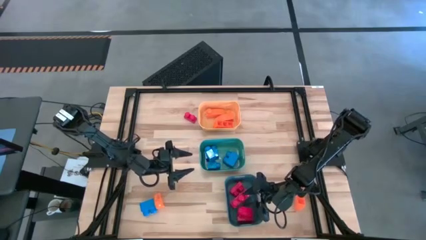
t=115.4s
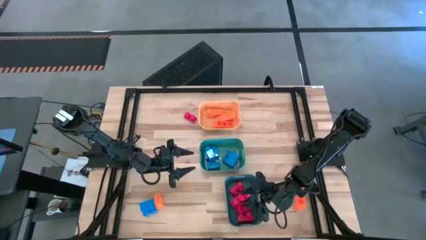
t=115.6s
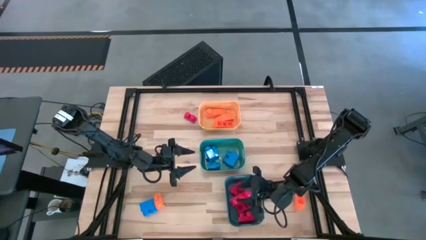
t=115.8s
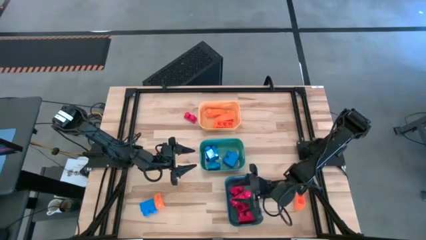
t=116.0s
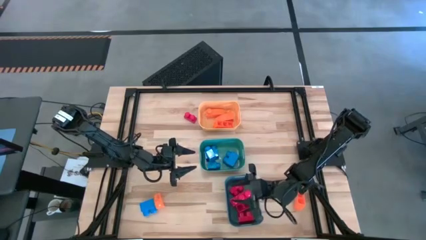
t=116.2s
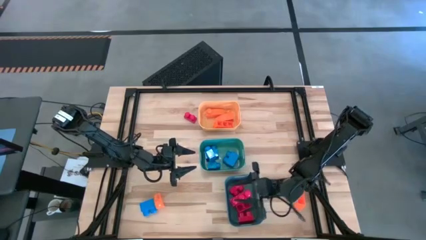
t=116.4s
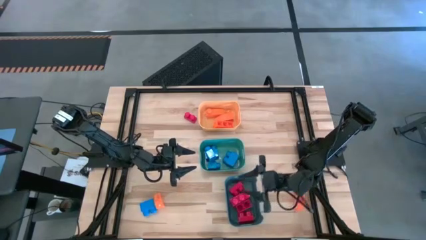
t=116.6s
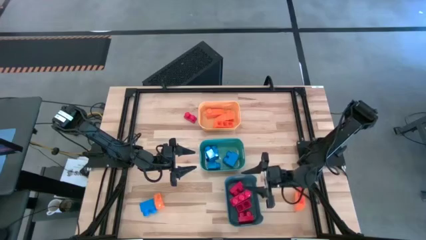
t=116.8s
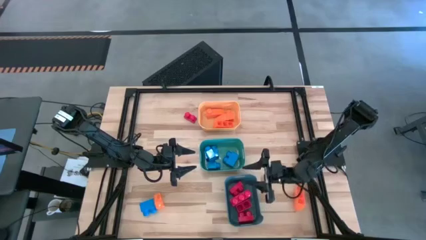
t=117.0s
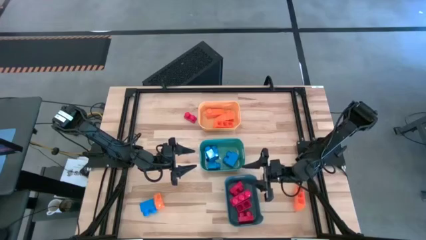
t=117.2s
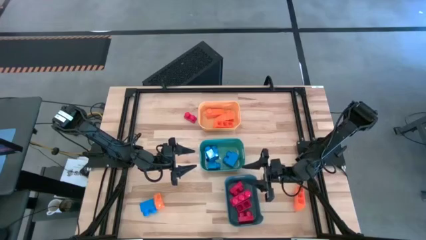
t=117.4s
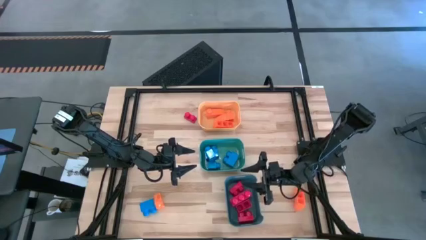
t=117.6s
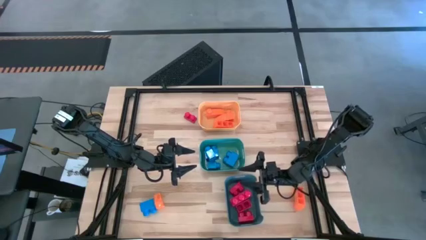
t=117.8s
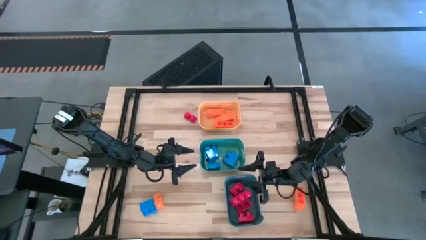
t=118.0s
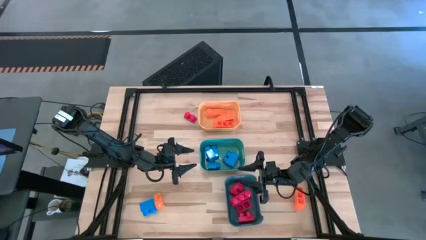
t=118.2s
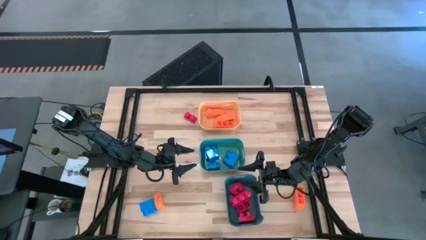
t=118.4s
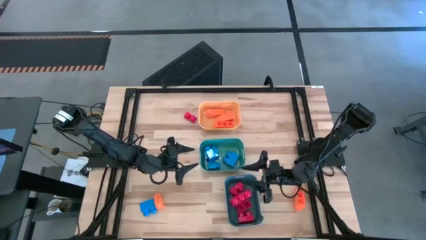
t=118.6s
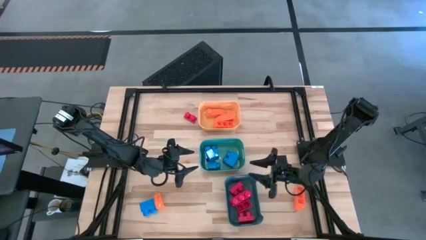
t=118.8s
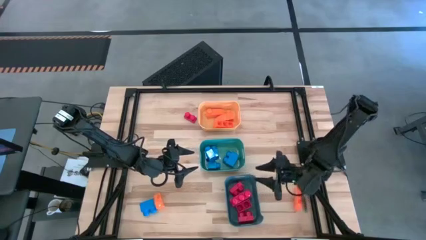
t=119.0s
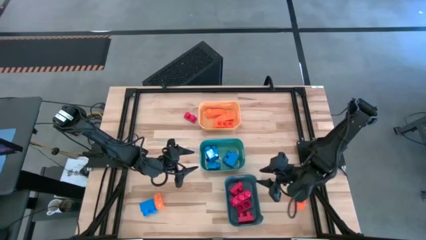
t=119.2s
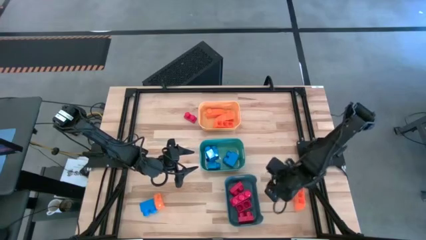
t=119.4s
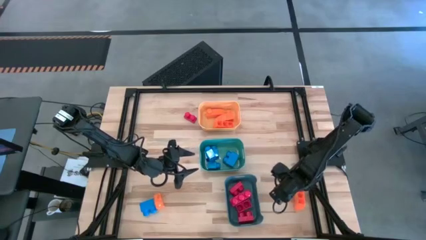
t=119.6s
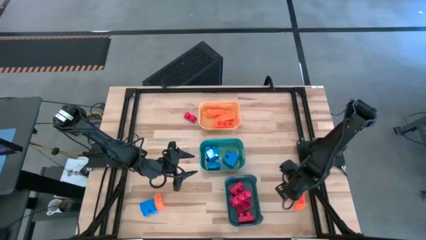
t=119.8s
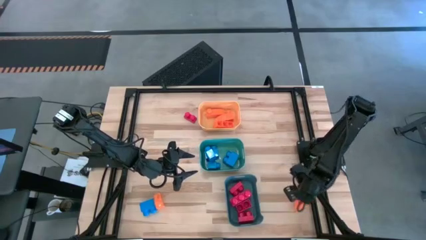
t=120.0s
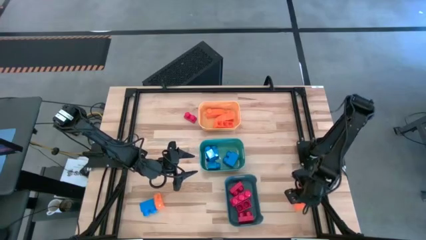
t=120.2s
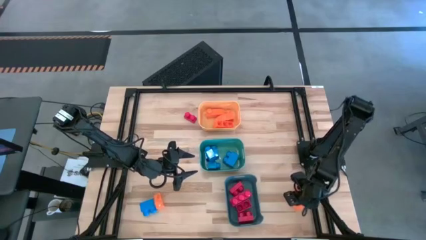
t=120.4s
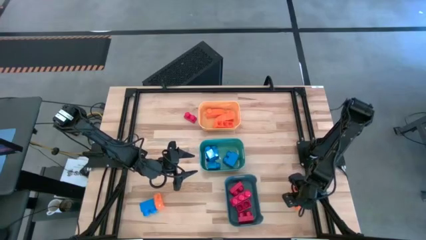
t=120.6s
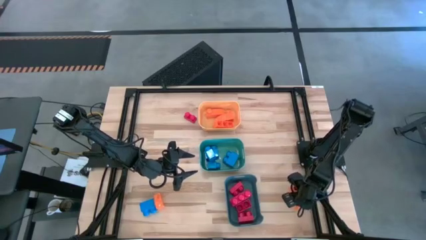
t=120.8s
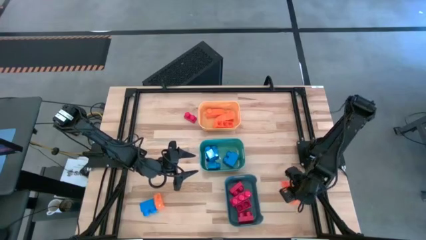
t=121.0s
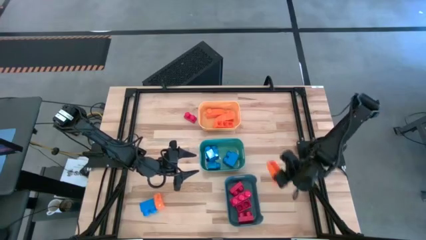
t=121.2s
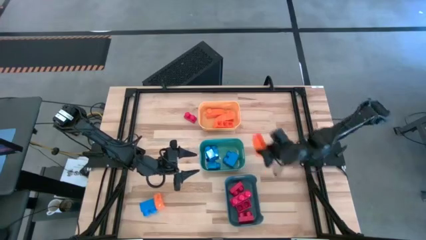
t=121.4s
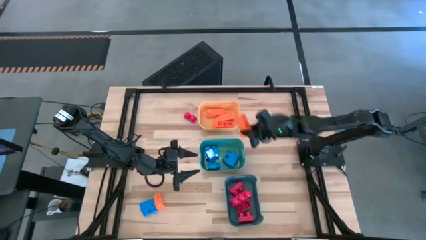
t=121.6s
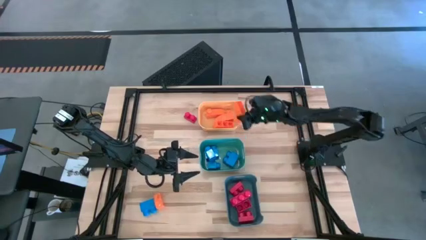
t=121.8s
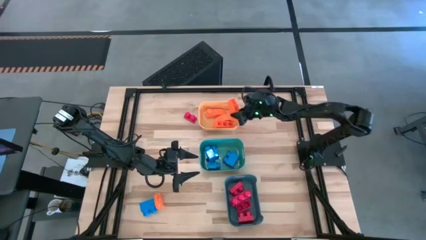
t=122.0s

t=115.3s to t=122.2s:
Task: Sort & place blocks by color
Put the orange game piece into the orange bin

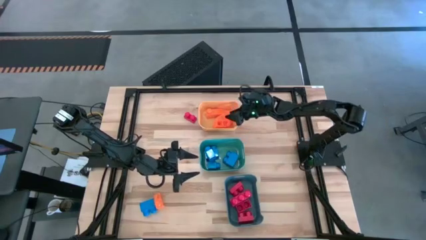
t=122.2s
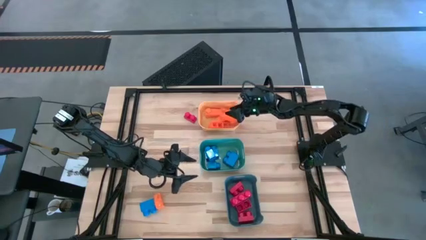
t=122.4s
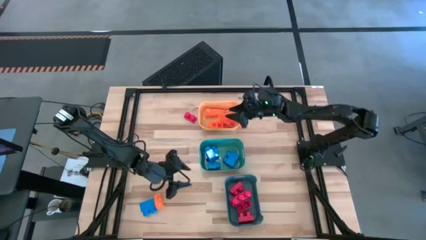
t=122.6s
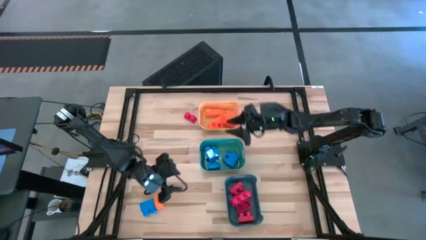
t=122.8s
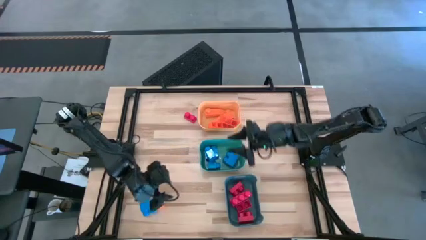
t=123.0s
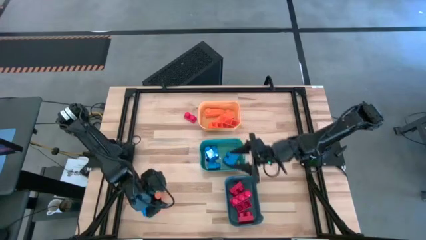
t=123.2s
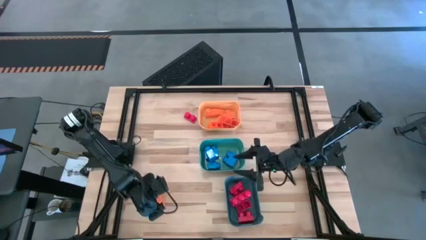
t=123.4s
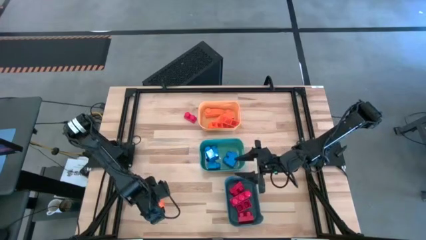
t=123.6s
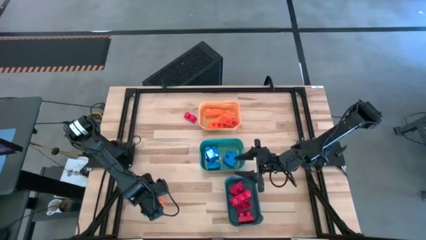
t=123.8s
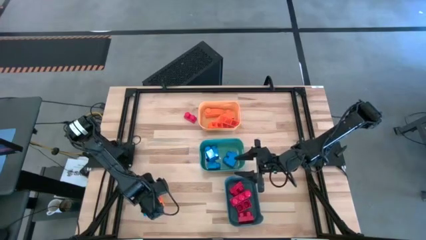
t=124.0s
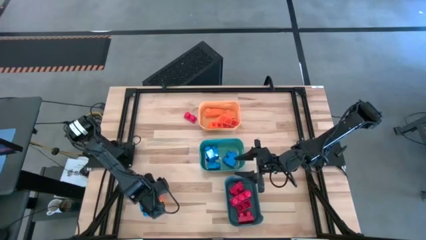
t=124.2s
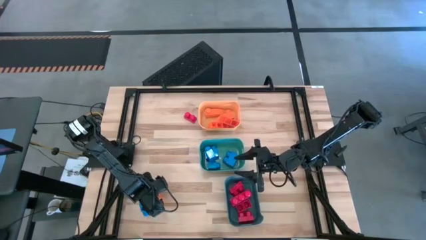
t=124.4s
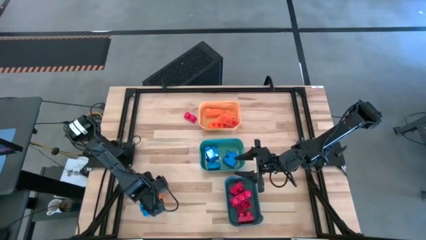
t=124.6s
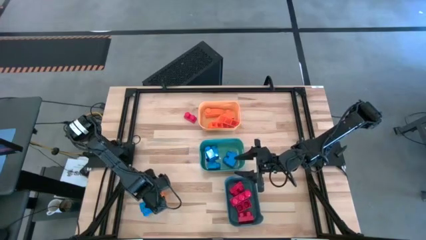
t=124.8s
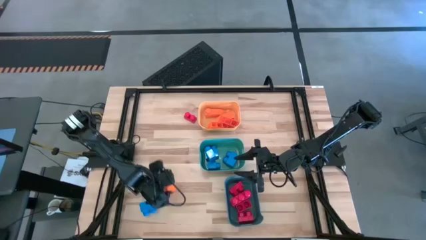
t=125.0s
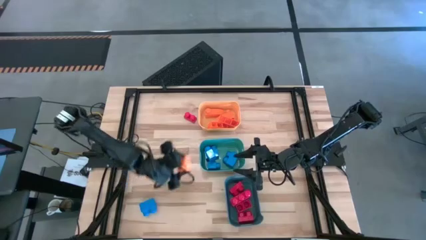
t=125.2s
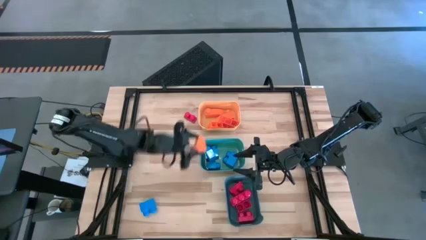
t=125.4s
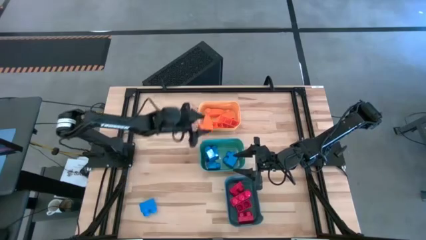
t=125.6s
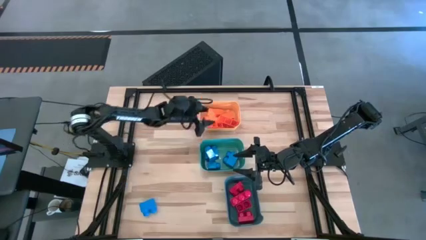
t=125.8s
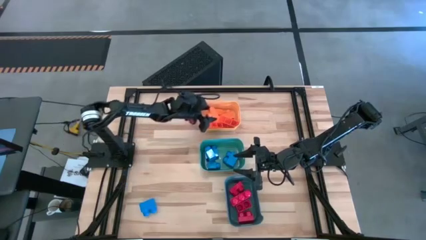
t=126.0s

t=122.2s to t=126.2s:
Put the orange game piece into the orange bin

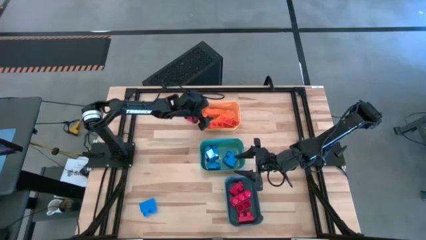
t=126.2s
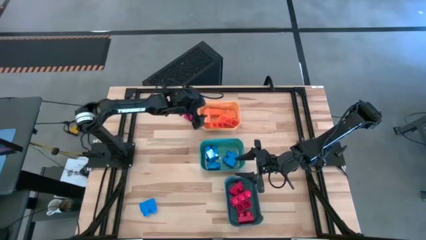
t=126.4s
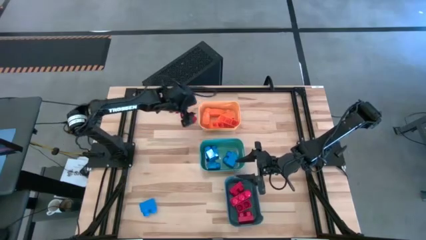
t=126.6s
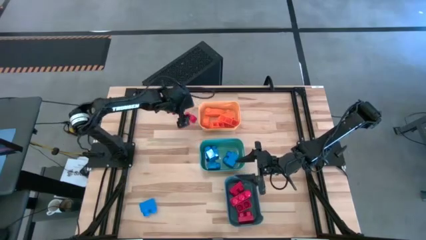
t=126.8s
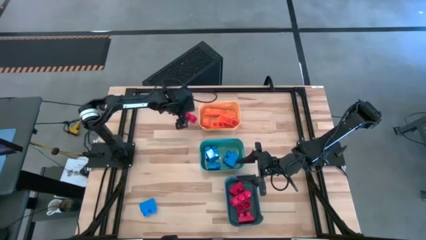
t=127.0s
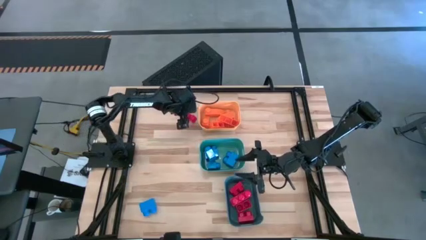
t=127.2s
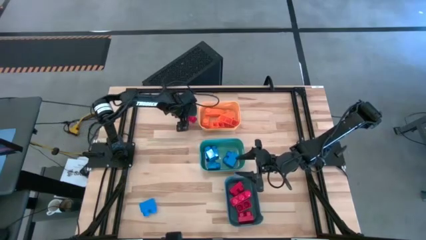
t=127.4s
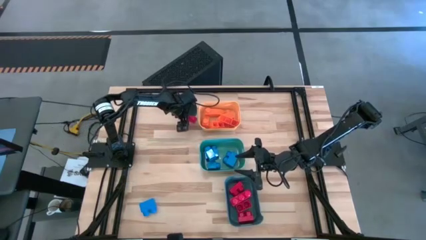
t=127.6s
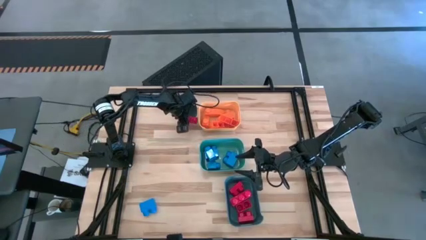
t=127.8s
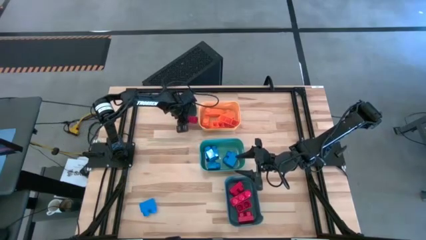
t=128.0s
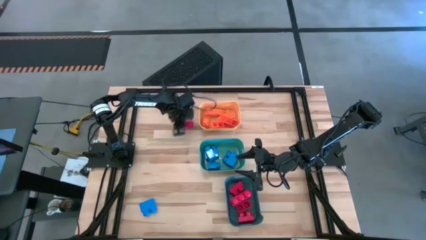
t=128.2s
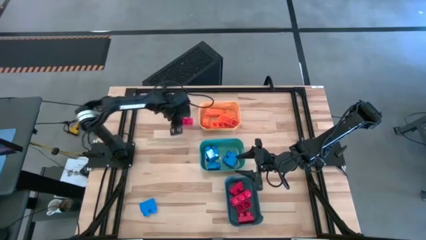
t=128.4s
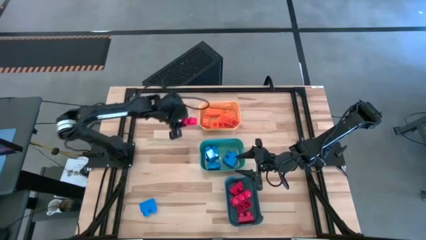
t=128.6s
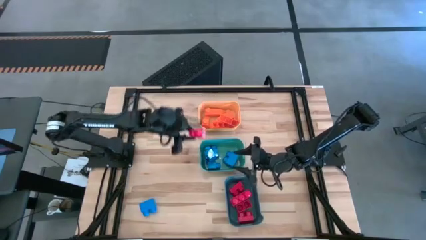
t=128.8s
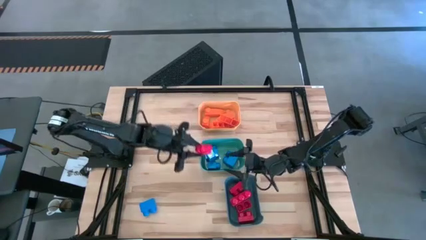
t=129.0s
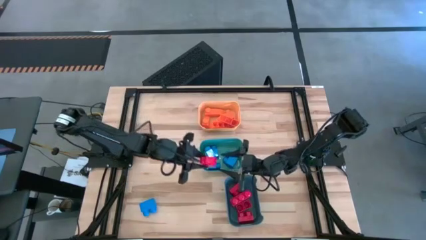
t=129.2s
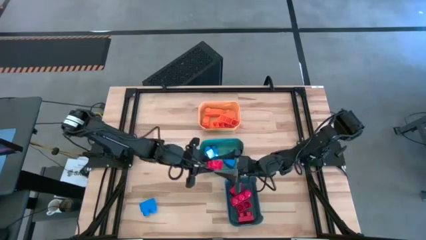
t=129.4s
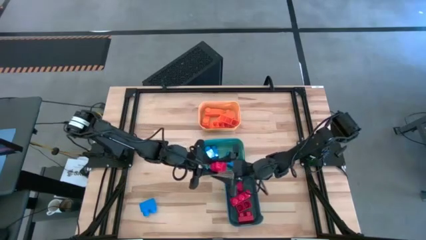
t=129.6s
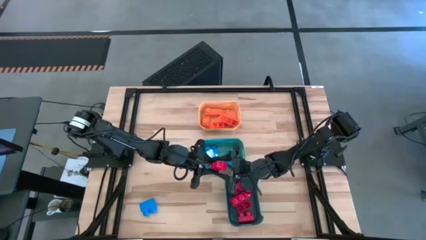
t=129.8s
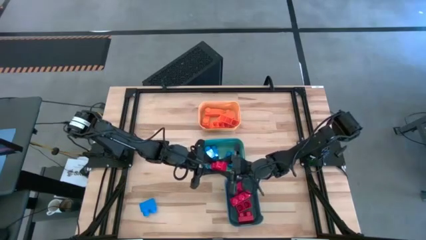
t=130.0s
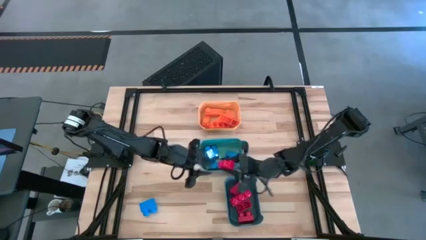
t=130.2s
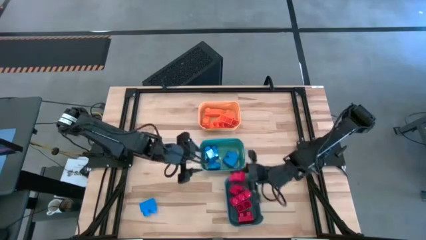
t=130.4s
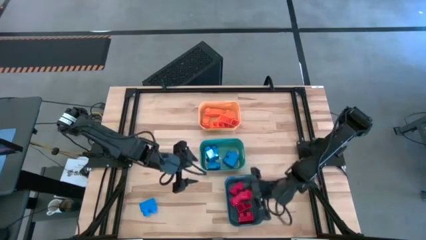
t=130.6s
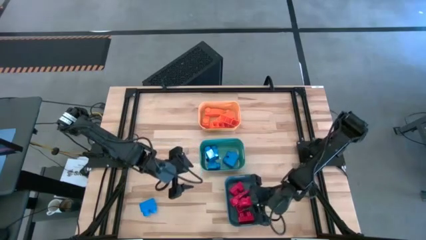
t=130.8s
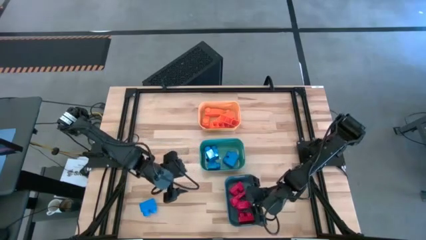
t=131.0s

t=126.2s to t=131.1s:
Put the red game piece into the blue bin

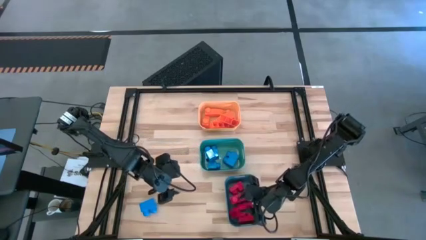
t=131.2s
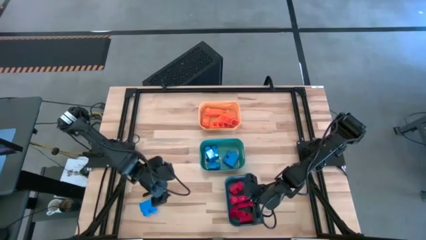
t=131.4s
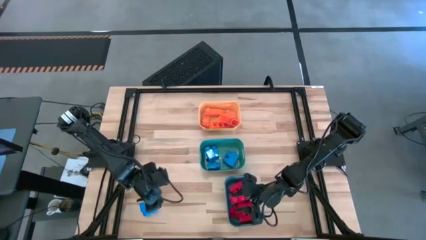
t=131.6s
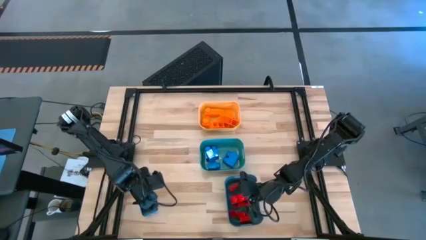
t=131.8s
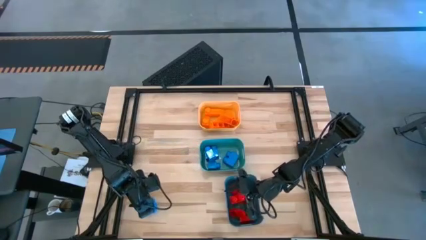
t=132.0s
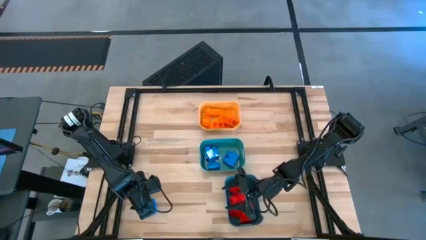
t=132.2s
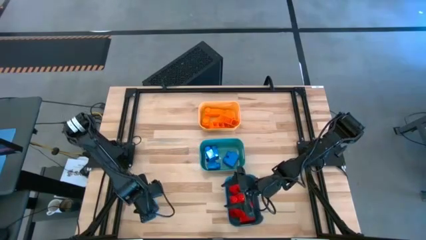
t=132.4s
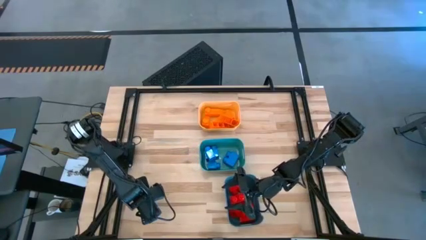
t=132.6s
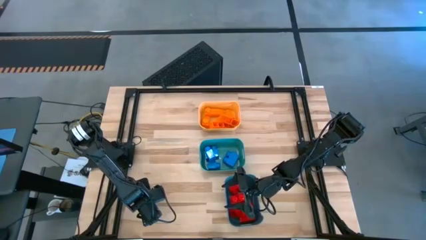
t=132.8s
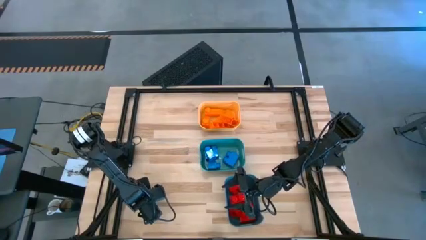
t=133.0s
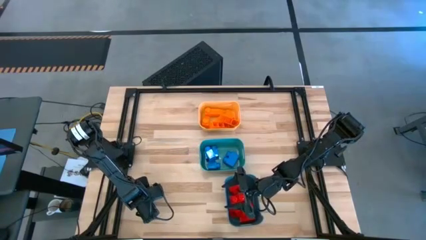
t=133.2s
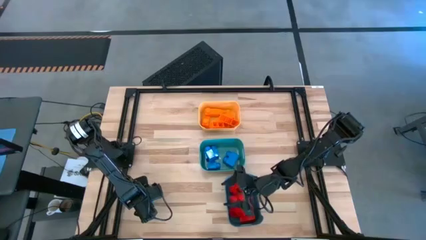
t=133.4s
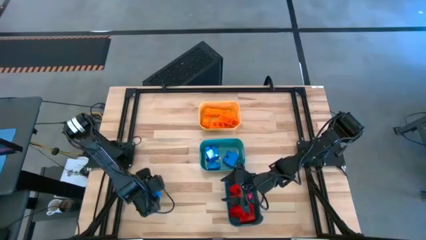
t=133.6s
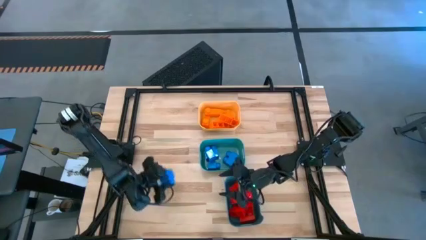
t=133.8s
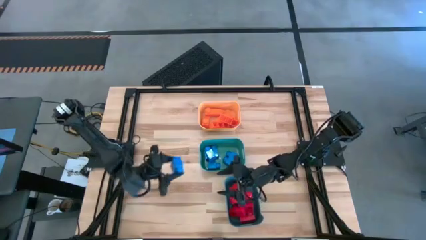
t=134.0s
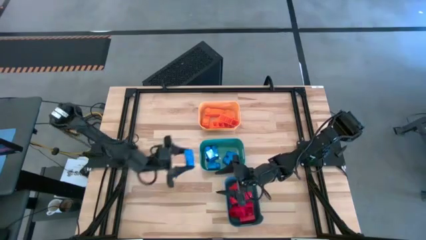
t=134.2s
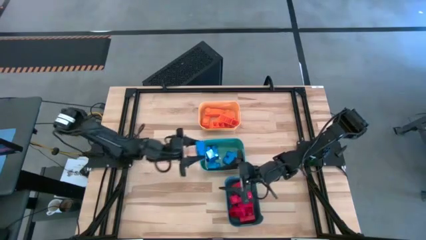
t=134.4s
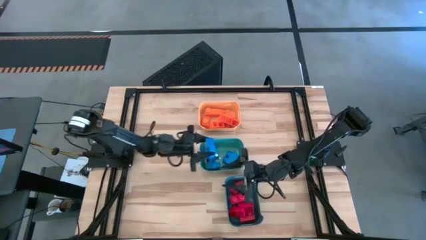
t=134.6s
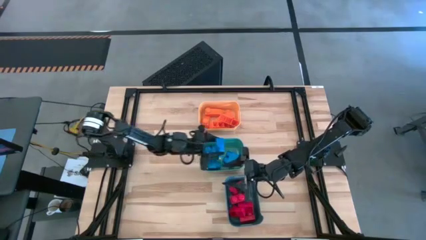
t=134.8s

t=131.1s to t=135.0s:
Put the blue game piece into the green bin
